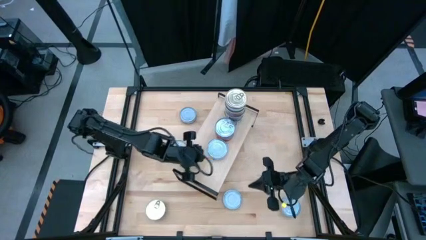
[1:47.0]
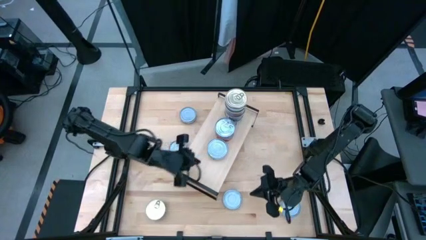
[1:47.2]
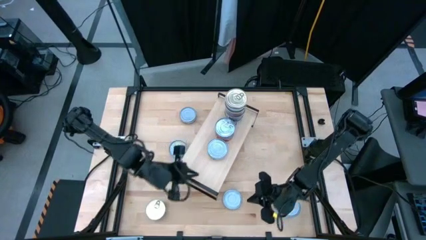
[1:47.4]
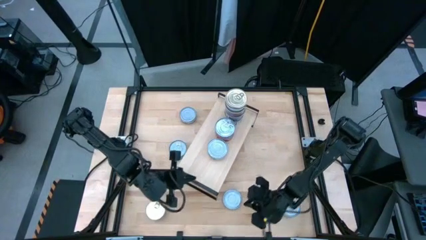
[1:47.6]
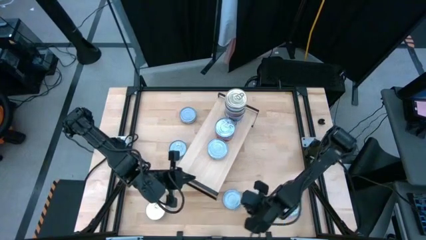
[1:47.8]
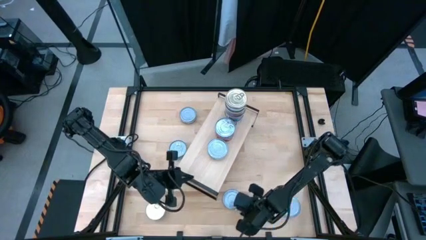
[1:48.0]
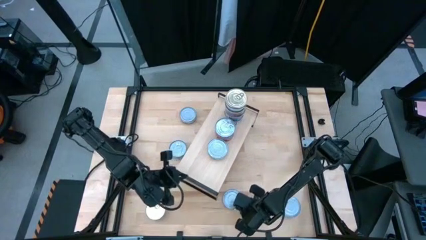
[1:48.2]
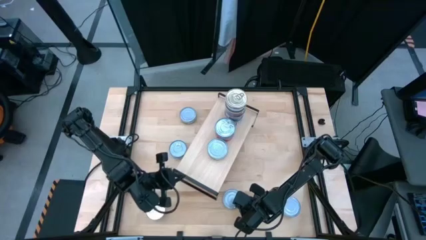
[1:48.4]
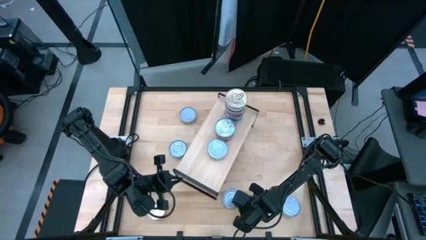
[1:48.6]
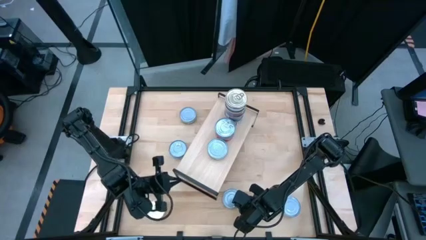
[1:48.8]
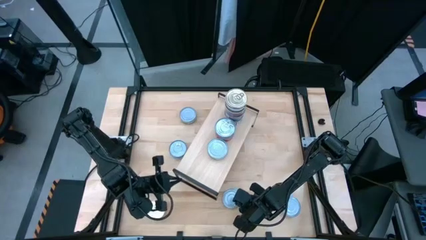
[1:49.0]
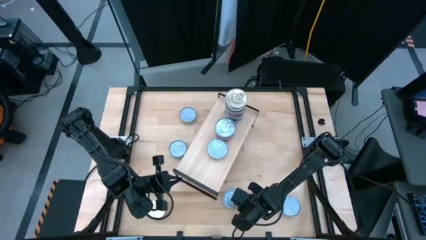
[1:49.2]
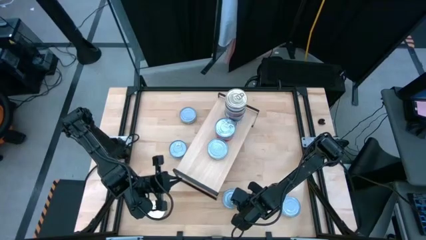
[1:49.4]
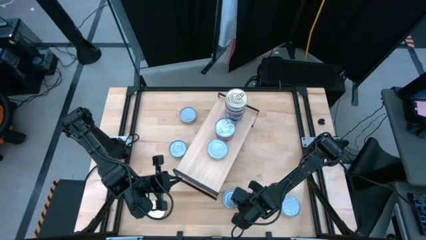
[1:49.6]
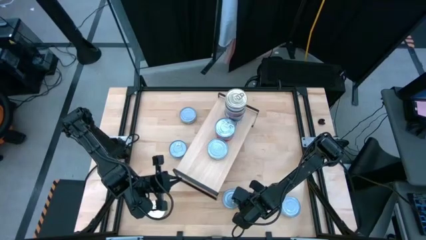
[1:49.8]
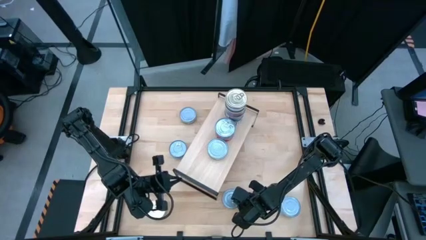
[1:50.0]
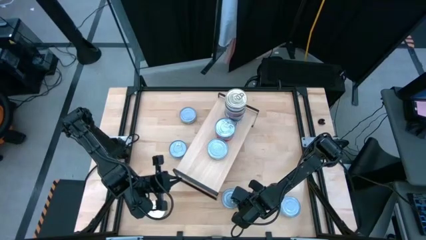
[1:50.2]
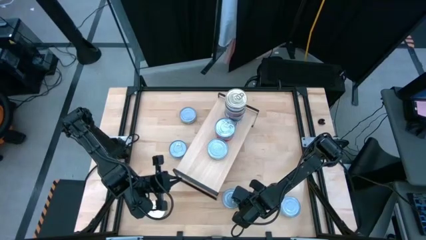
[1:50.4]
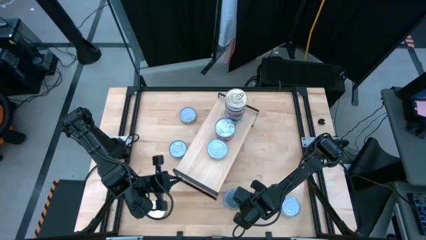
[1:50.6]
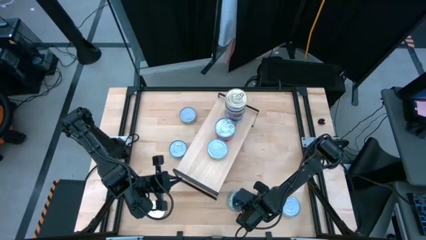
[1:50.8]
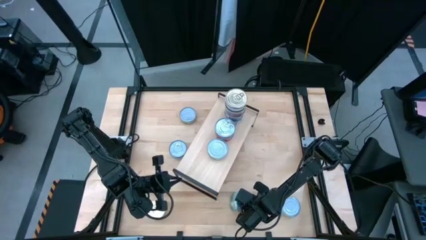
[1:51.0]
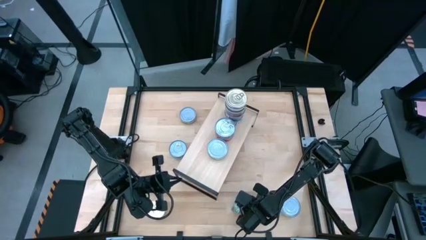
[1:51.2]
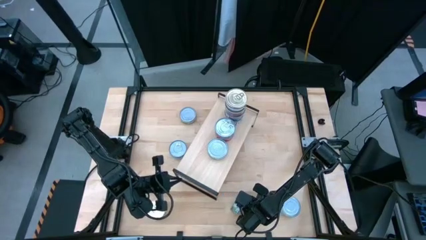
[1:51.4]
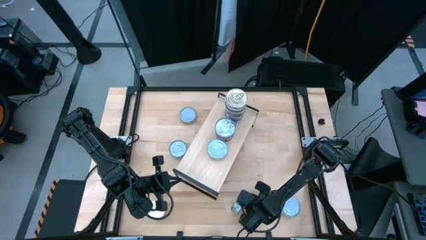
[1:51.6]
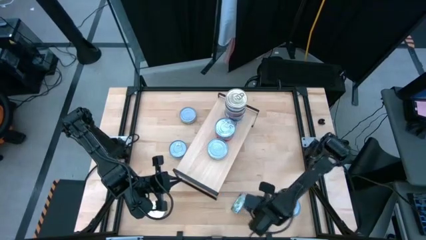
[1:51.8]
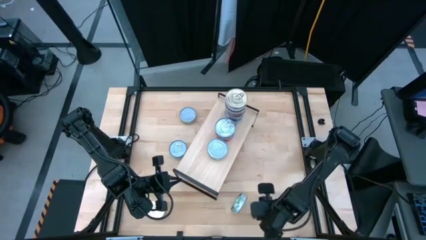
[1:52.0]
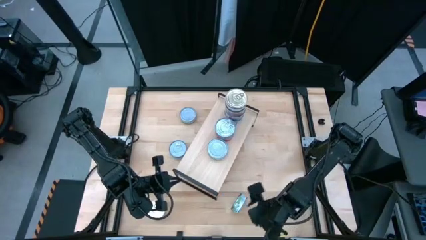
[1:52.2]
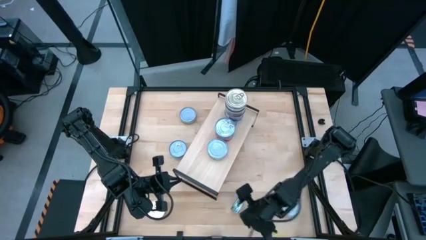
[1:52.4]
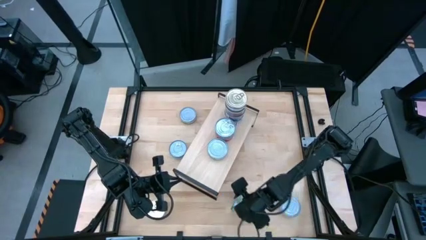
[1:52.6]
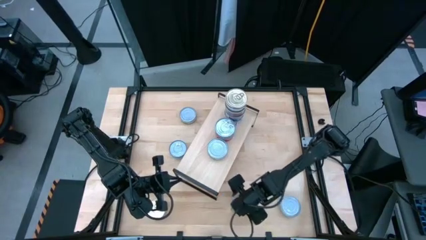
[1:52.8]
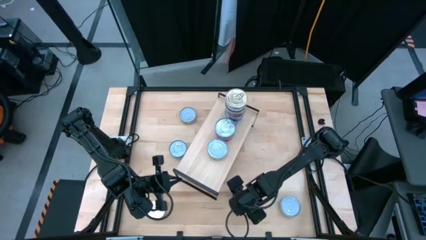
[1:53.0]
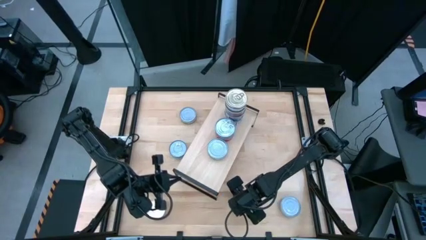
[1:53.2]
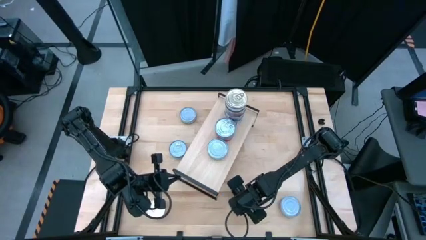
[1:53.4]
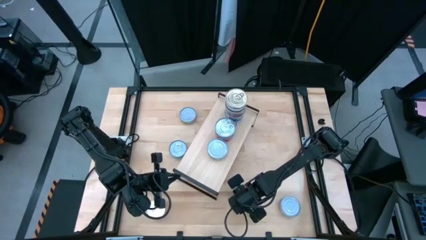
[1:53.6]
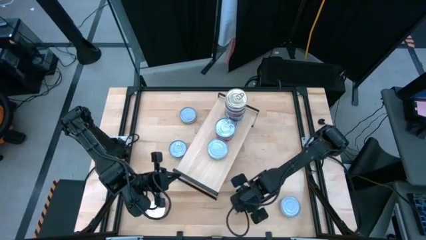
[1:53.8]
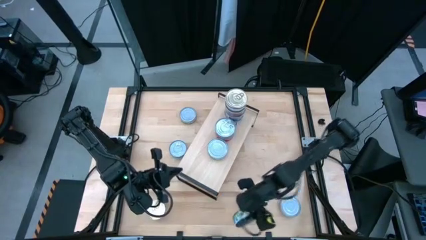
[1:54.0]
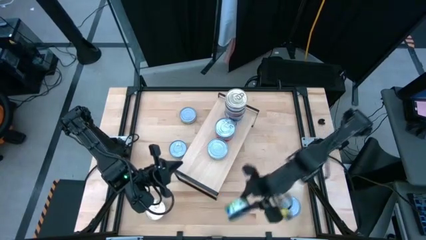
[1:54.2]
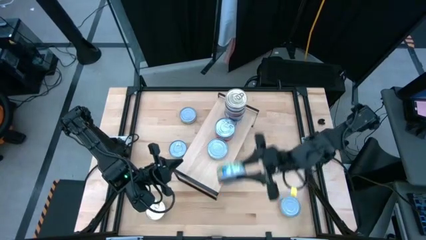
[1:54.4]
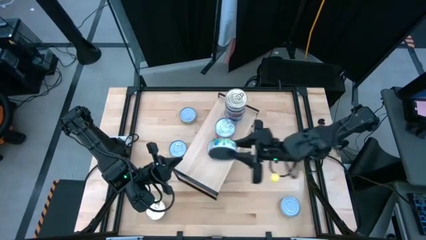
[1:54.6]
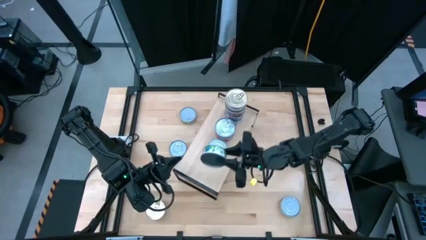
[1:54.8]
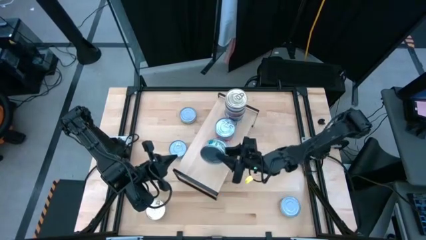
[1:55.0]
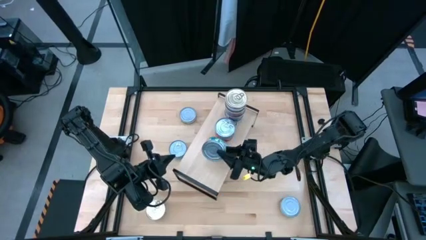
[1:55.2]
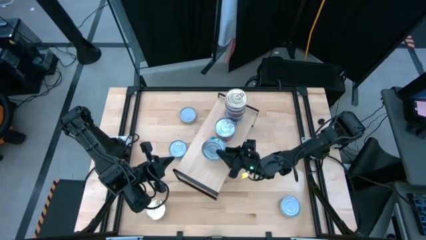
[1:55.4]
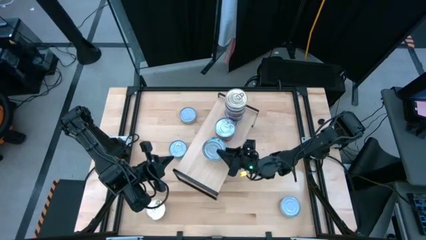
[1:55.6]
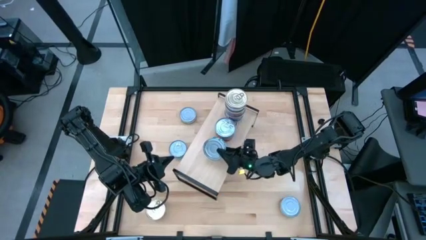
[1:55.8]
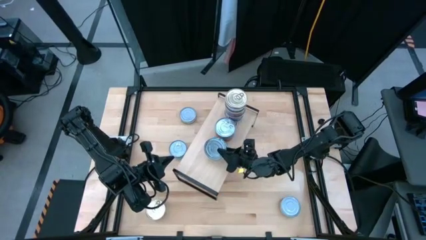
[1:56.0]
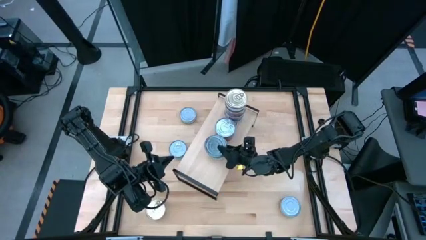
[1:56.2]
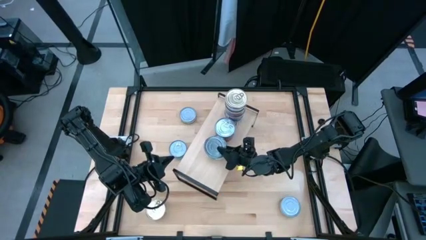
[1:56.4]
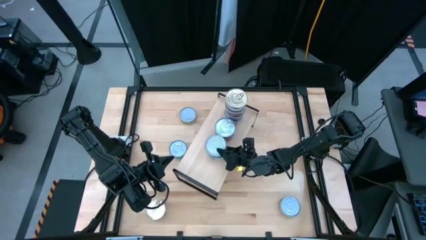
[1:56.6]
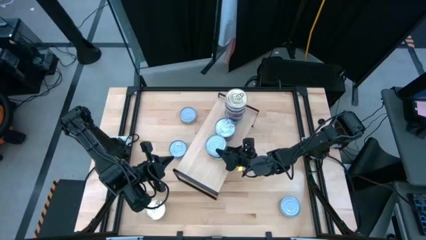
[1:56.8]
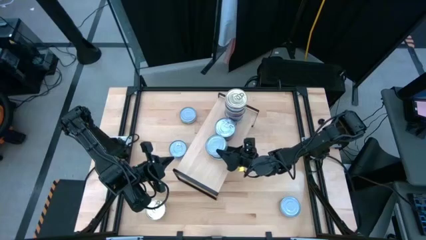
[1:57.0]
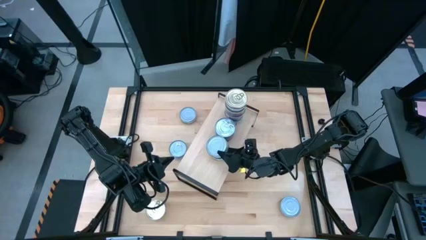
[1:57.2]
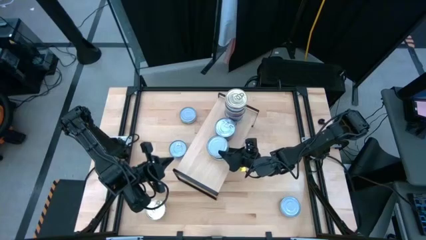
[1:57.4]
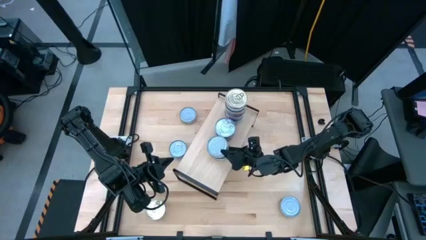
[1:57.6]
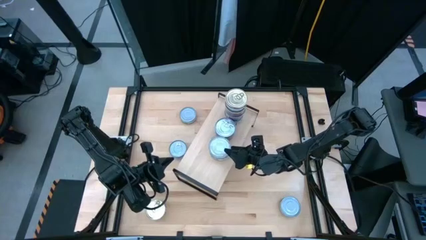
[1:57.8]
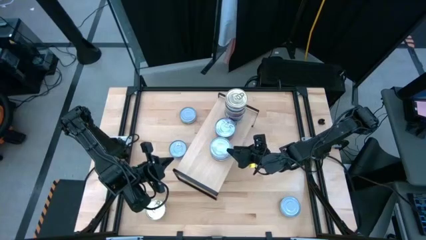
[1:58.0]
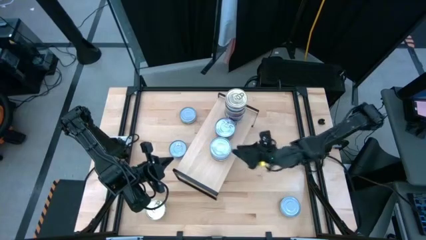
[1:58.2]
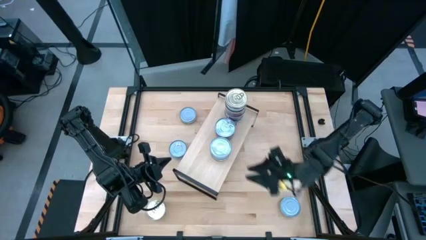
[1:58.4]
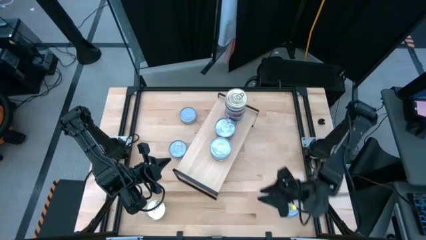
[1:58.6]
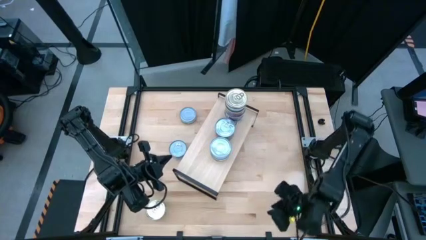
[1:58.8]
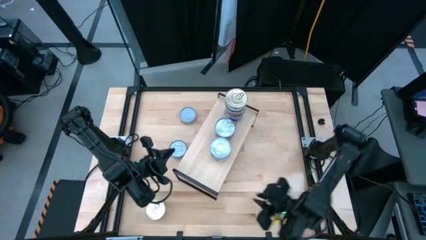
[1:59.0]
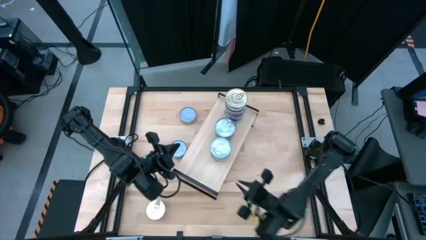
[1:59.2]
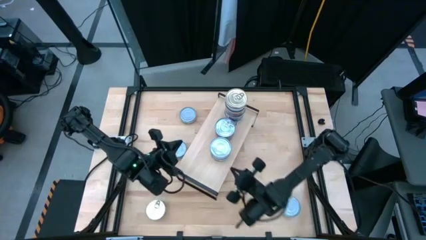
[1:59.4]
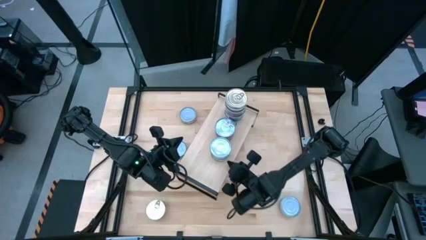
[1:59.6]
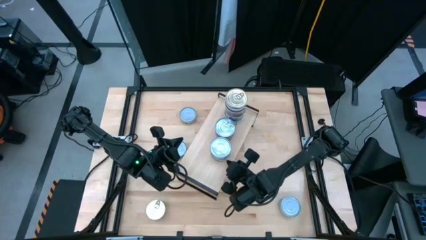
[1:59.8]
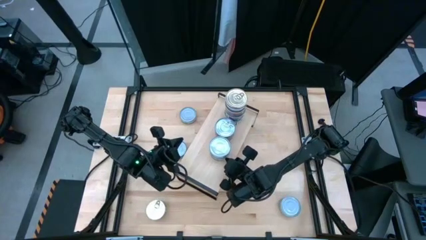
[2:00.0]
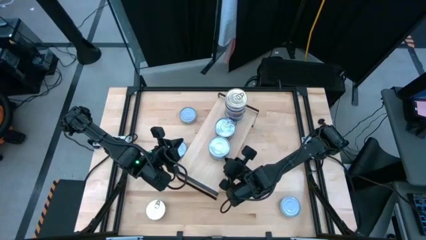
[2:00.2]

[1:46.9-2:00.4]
Task: Stack canned seafood by type on shelf
Stack the green tuna can on top of the green tuna can on the shelf

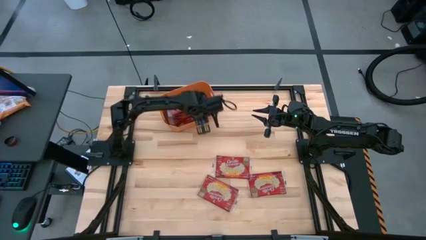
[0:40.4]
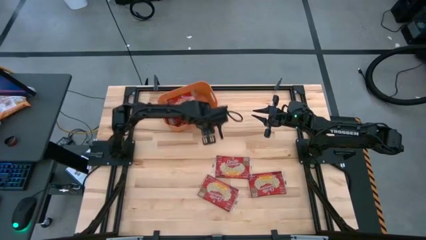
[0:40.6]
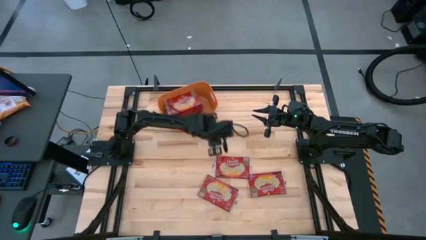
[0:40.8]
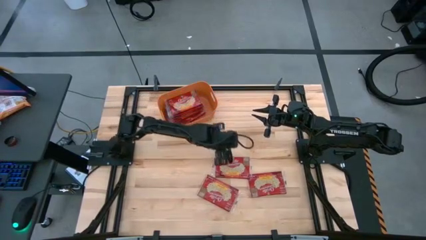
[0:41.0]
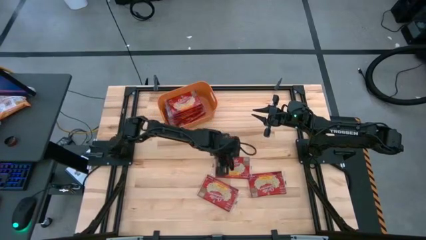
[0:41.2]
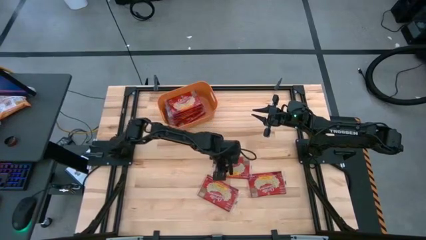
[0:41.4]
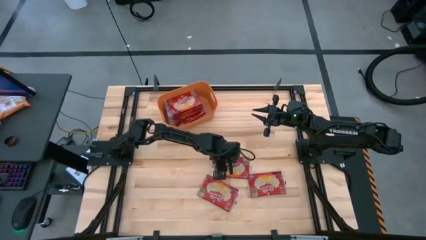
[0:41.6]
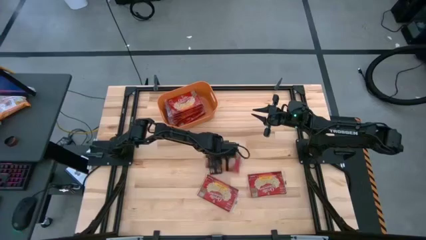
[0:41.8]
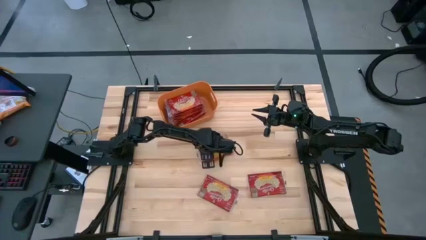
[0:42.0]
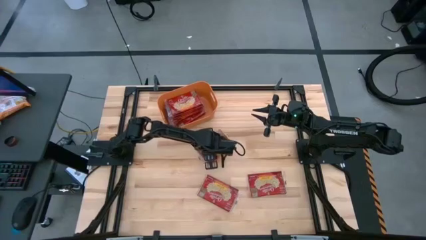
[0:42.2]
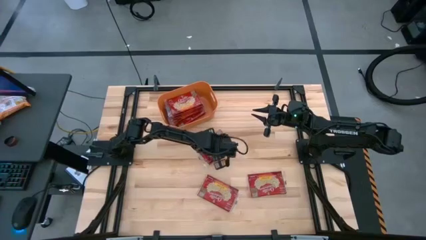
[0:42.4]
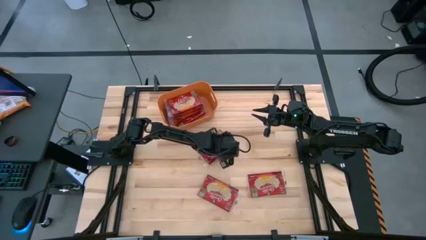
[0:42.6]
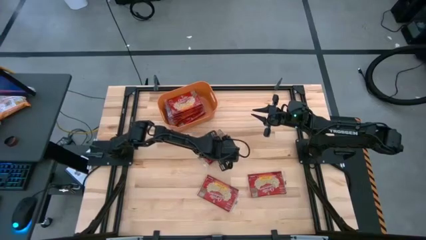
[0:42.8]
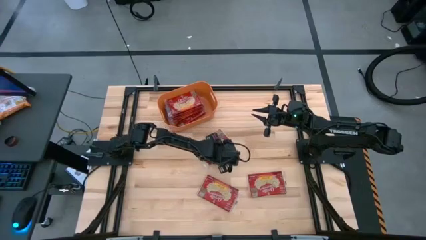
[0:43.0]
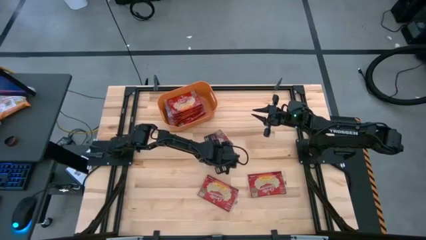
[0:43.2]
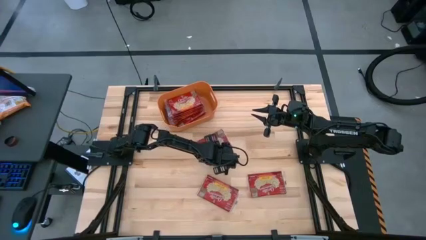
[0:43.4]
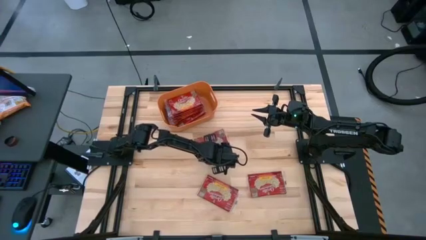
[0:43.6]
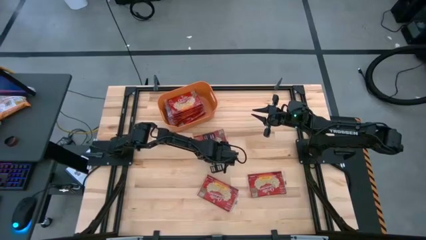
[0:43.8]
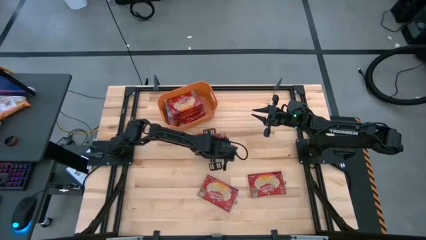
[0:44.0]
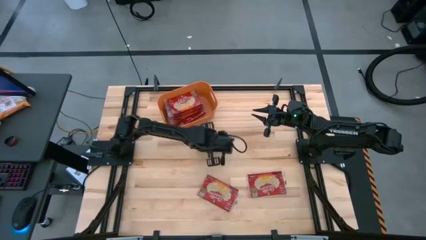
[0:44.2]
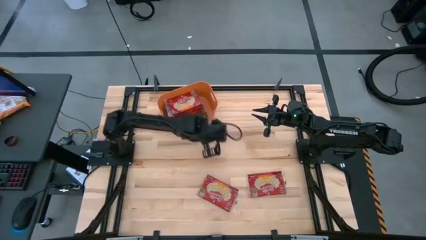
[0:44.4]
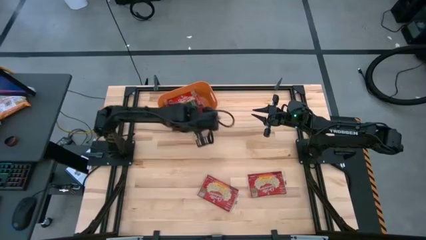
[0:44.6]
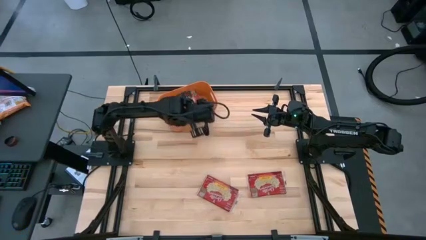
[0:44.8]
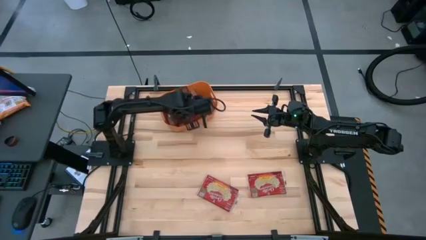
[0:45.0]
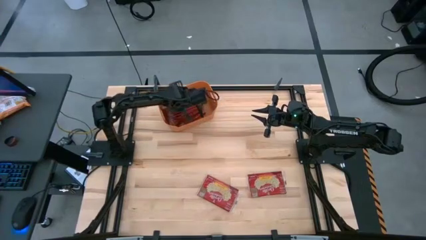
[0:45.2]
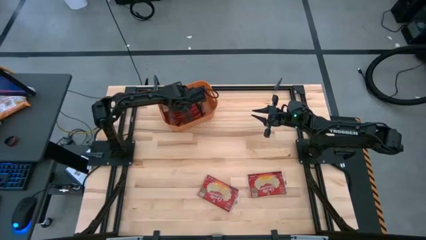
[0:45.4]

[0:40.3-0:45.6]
Task: Sort popcorn bags into baskets
Put the red popcorn pack into the orange bin
